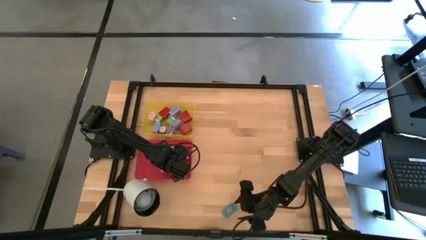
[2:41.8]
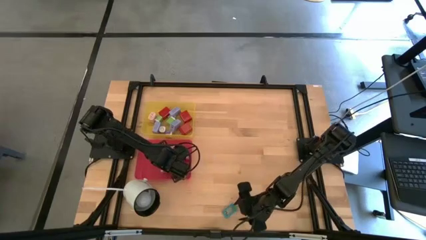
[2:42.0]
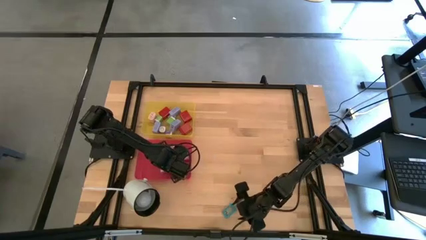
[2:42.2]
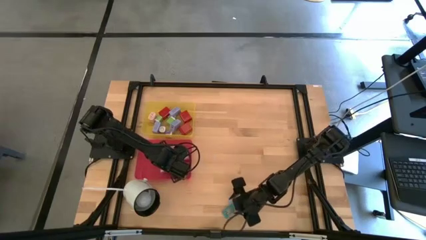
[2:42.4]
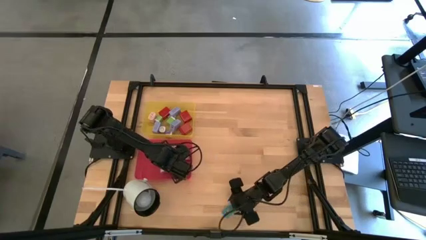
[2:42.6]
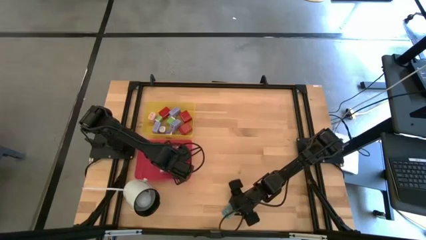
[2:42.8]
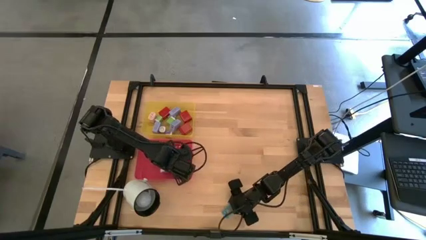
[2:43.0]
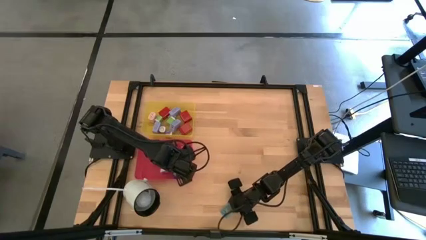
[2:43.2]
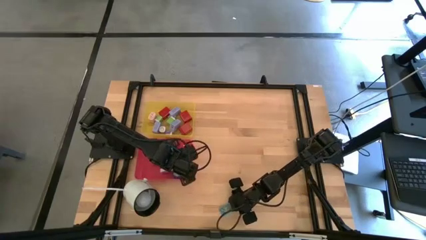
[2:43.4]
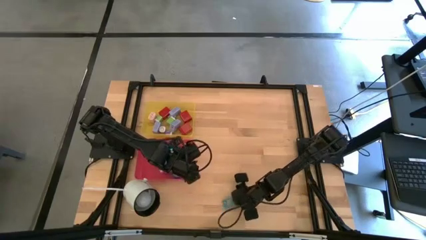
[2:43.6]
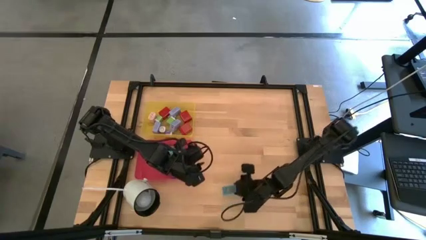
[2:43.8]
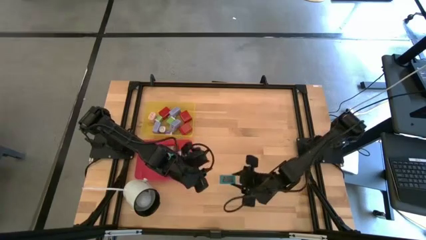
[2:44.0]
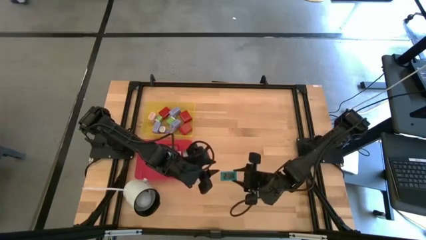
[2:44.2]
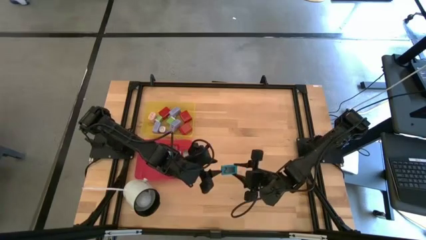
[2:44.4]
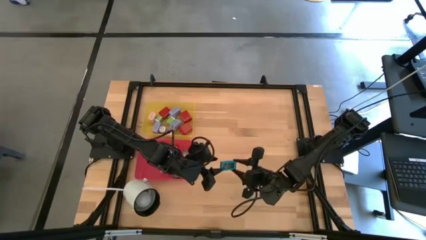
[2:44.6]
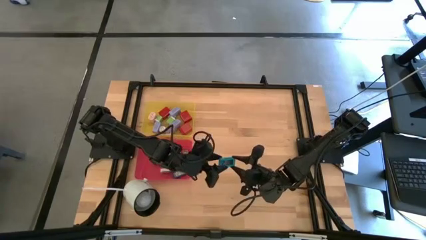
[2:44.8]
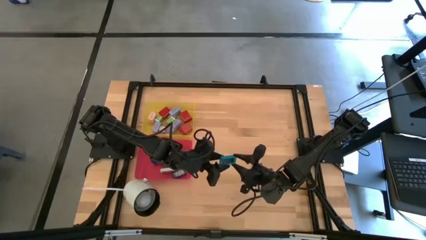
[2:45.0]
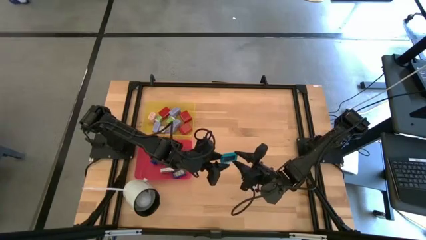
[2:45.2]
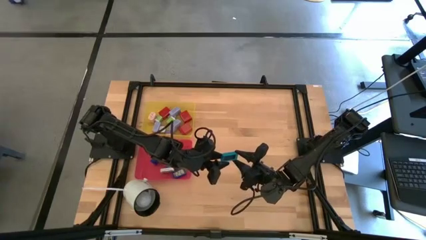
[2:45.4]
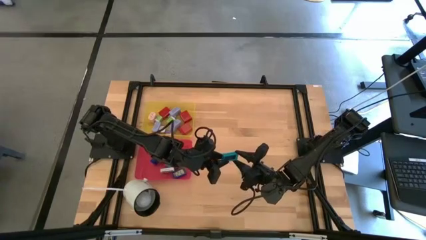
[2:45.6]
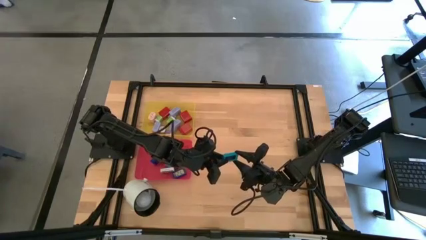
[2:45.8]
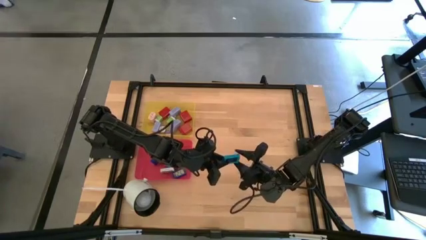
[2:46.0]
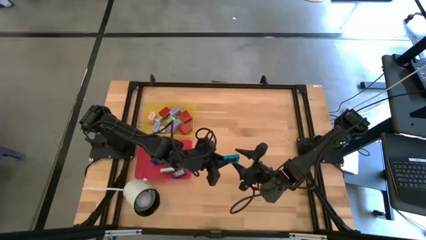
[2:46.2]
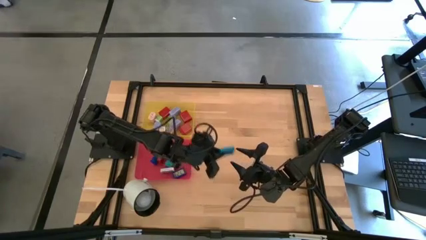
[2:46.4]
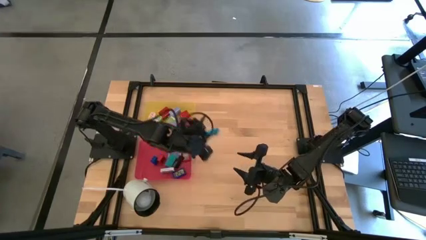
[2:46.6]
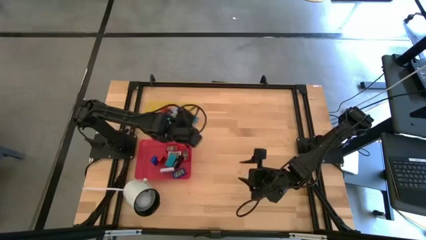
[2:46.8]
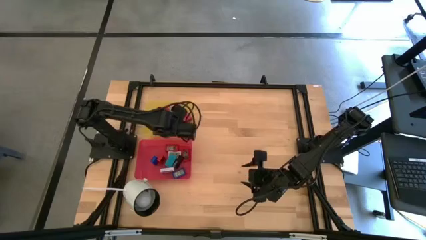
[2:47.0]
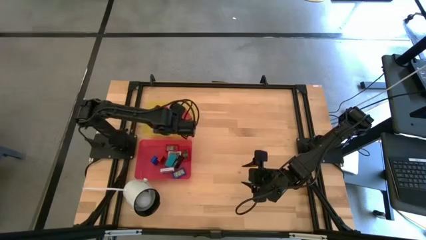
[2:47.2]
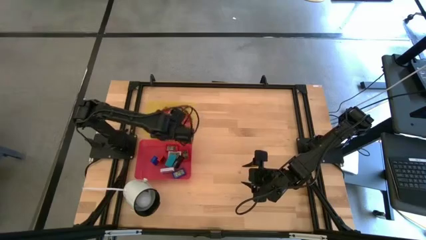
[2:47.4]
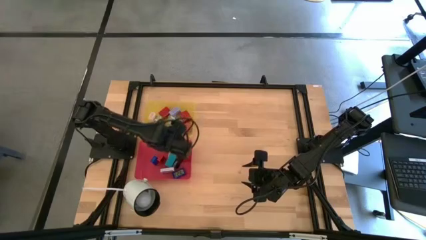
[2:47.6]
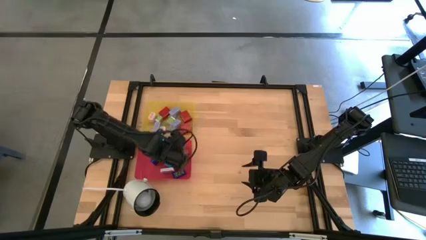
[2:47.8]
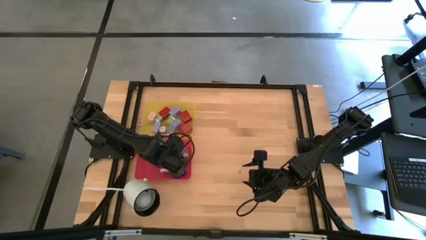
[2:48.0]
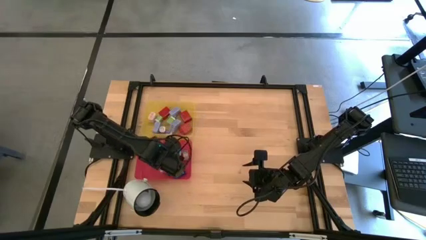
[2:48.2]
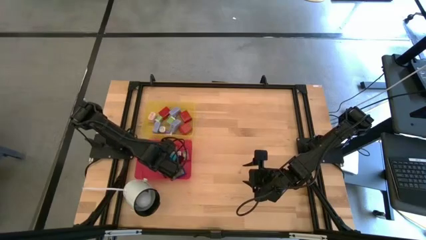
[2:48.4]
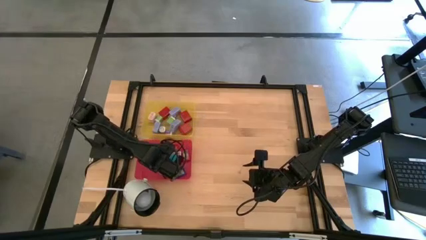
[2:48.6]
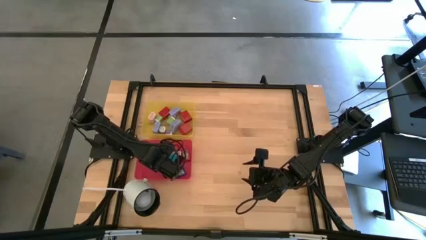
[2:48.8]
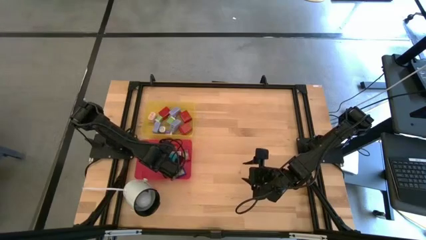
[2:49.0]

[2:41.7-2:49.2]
Task: Pick & Place Office items
Put the light blue timer into the red bin

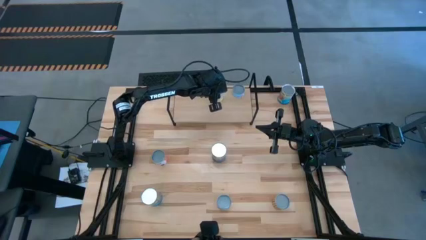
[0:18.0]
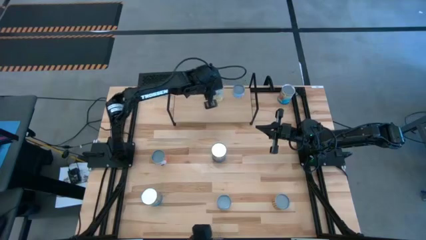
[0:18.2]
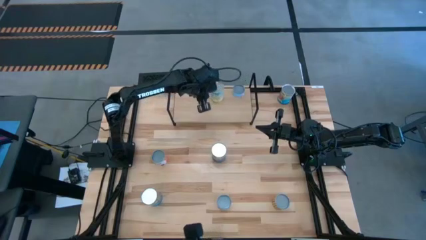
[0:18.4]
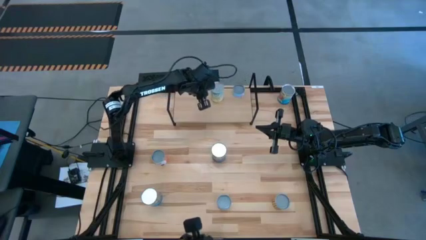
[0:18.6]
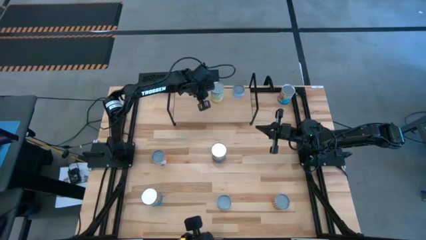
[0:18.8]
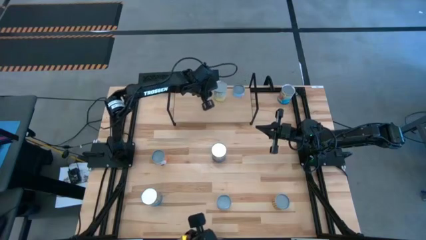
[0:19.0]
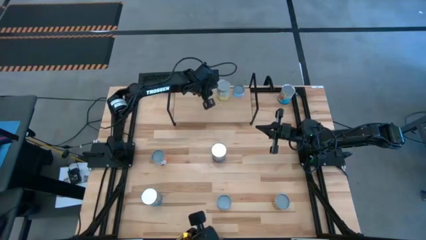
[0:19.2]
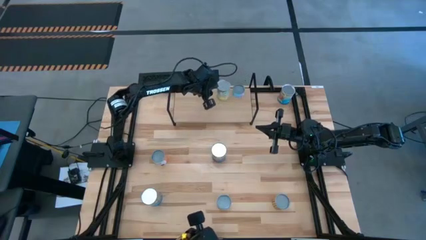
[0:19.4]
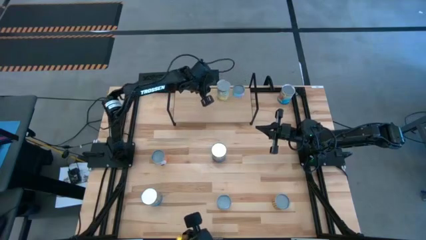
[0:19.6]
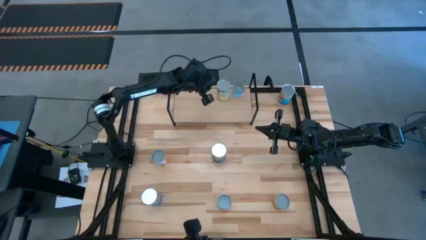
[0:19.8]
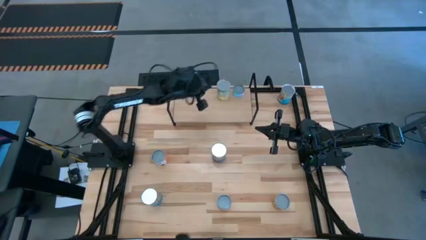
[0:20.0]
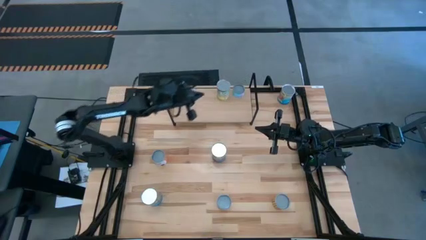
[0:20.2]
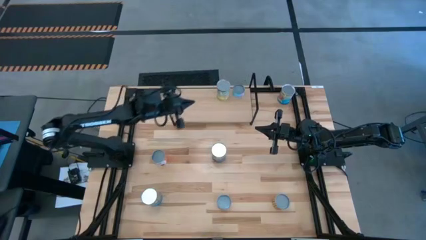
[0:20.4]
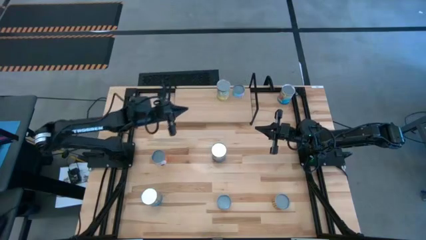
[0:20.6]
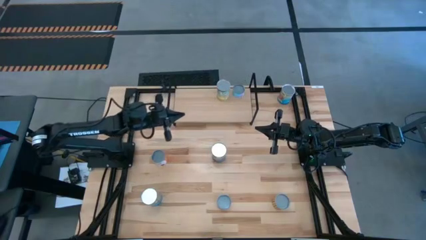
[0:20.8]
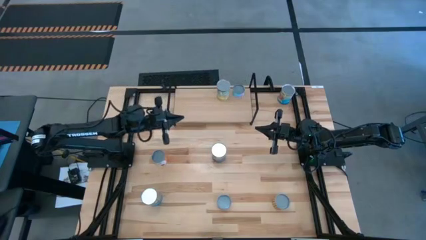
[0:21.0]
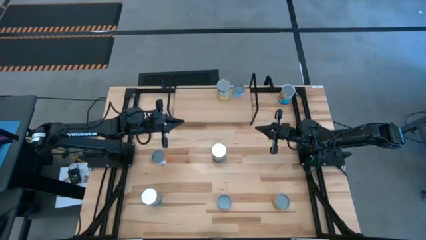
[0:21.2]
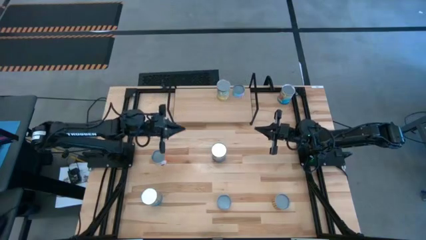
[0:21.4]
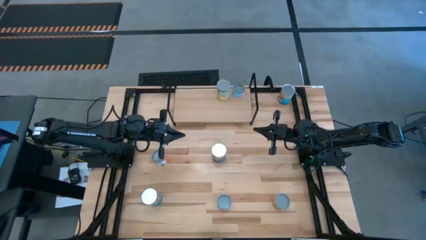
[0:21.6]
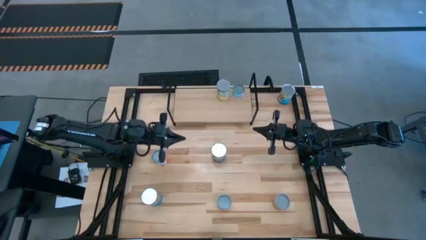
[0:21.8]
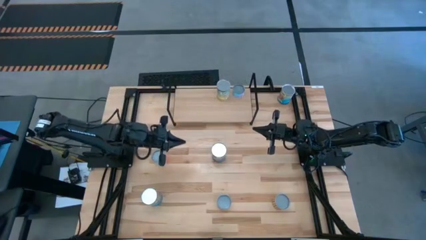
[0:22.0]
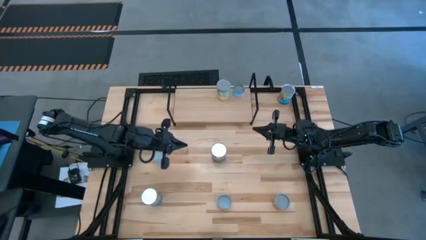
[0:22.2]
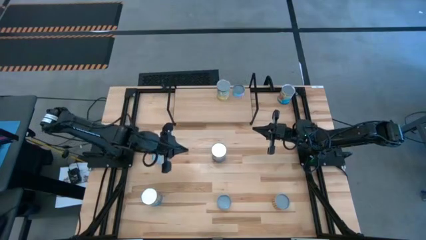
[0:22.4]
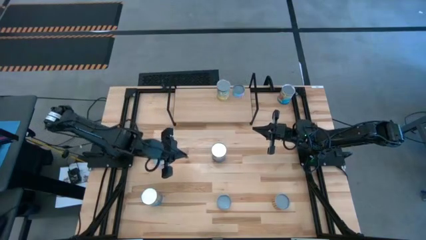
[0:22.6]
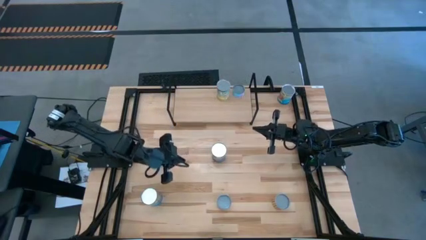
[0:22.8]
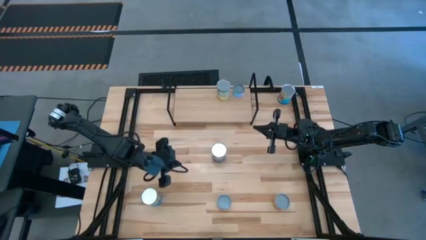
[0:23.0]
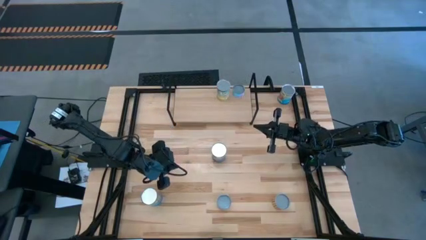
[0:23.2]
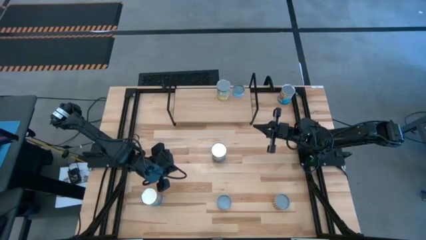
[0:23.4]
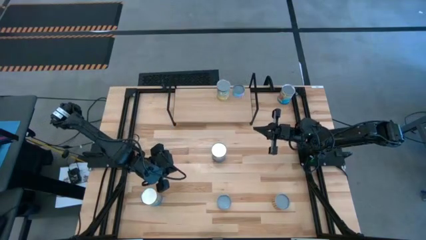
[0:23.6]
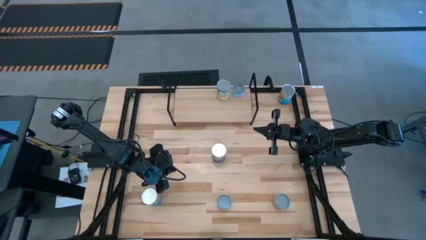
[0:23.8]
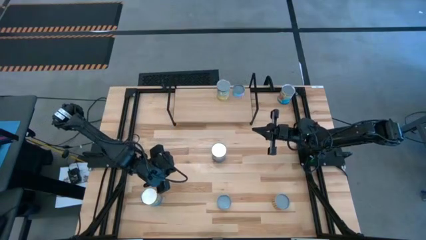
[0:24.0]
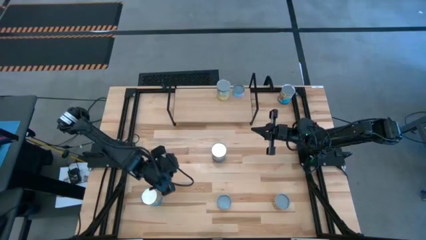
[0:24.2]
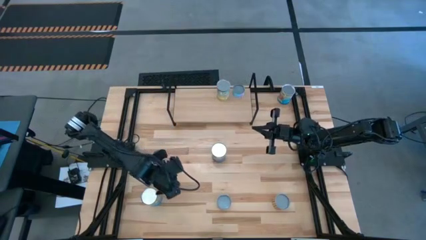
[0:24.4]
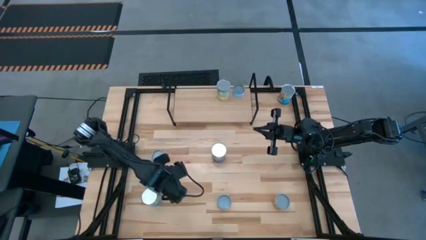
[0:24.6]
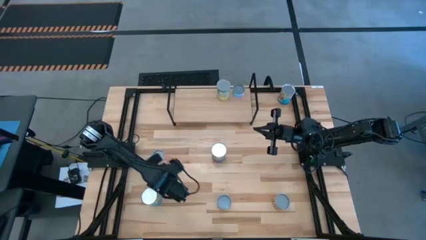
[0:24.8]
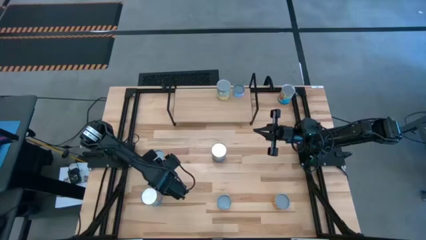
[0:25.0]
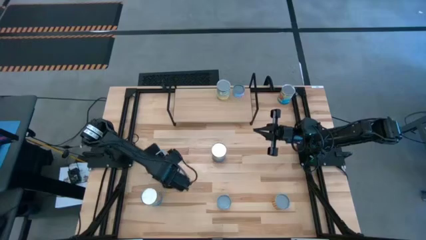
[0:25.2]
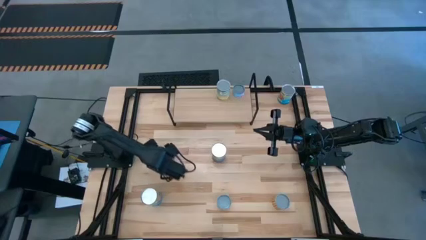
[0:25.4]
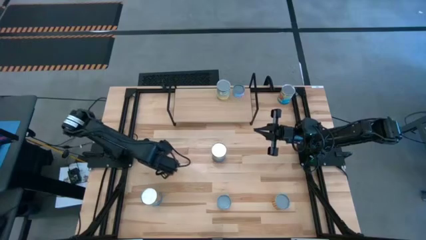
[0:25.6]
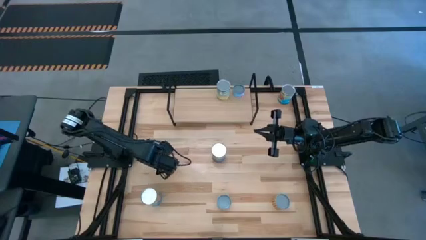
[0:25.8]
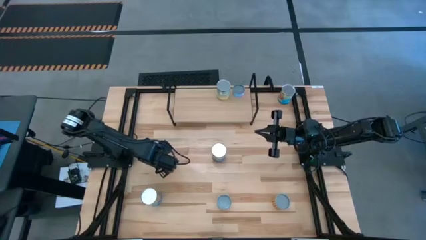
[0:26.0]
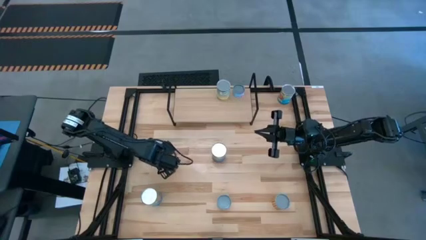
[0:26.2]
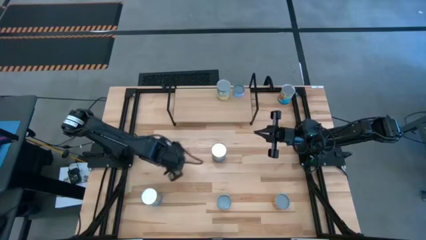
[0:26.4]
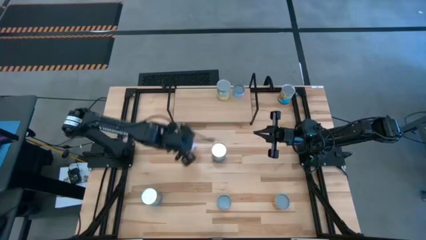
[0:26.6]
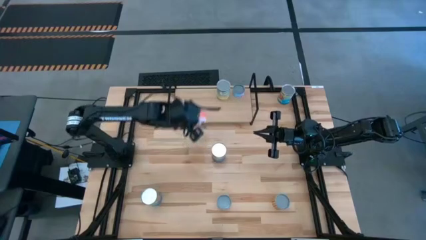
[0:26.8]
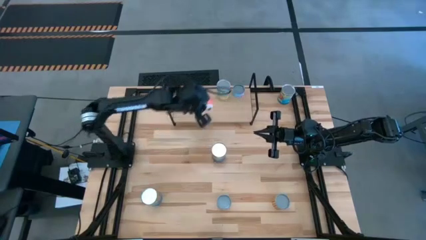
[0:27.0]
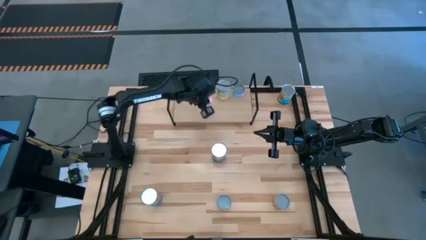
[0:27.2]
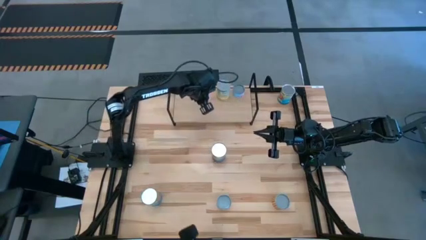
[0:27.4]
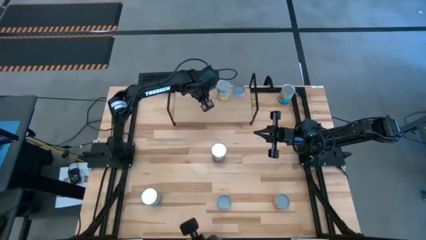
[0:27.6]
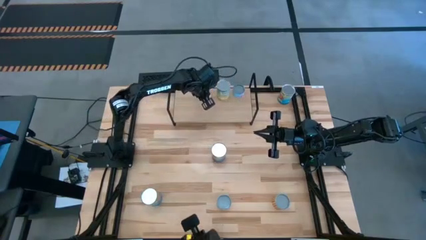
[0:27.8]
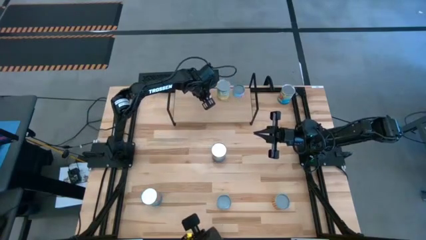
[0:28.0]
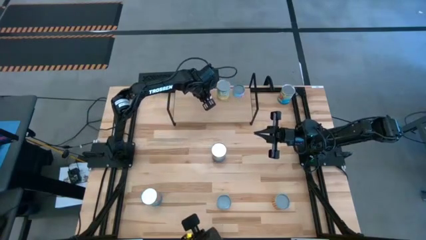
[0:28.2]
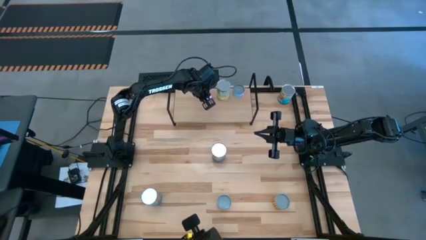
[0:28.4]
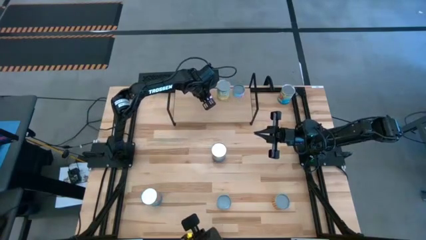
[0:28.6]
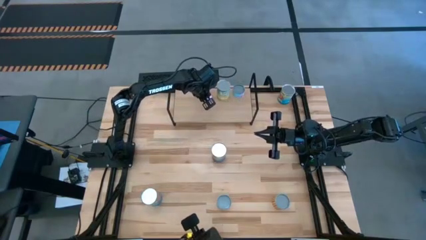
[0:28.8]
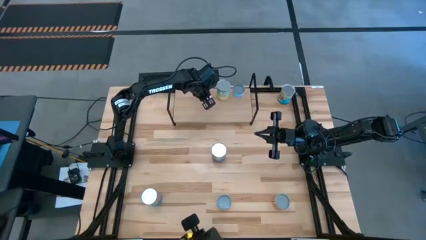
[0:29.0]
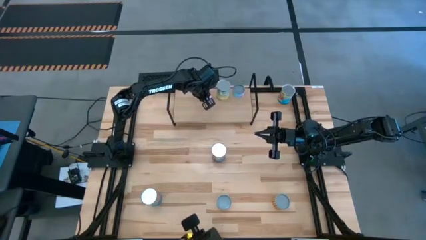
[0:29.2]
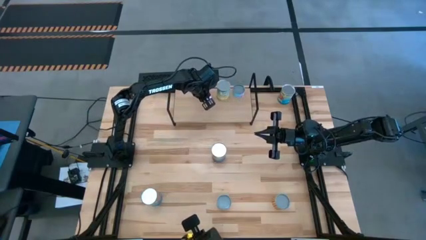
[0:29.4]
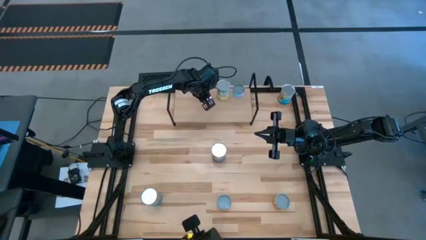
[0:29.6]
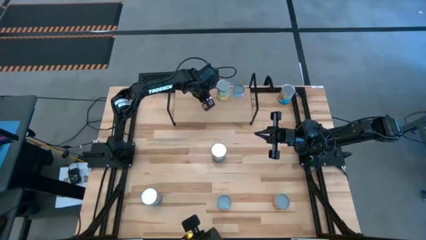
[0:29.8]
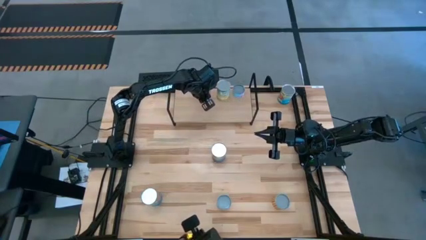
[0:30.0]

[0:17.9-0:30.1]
Task: Pick and place cans onto a shelf
Put the canned meatballs on the shelf
